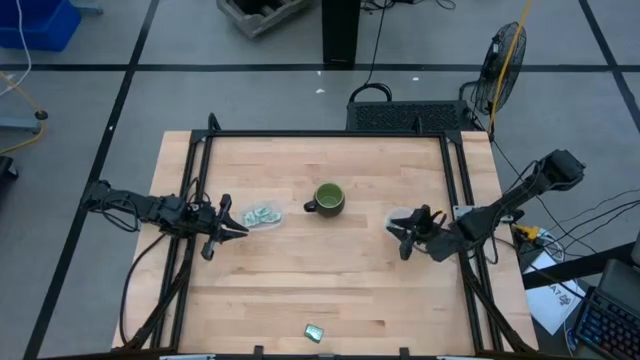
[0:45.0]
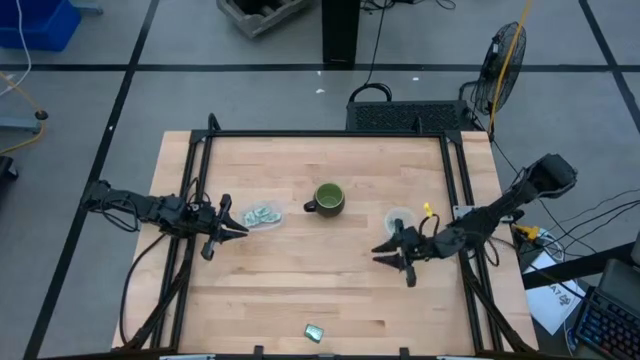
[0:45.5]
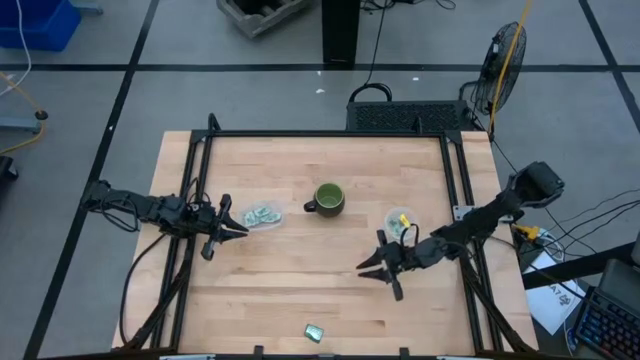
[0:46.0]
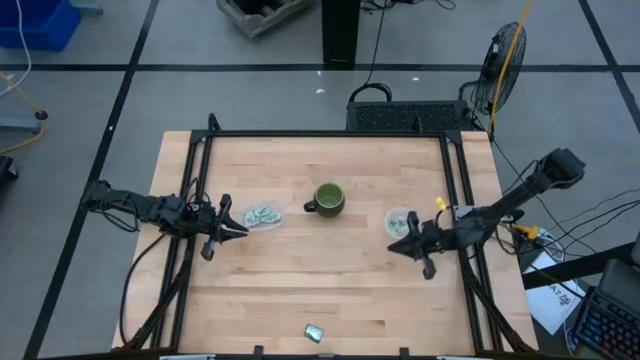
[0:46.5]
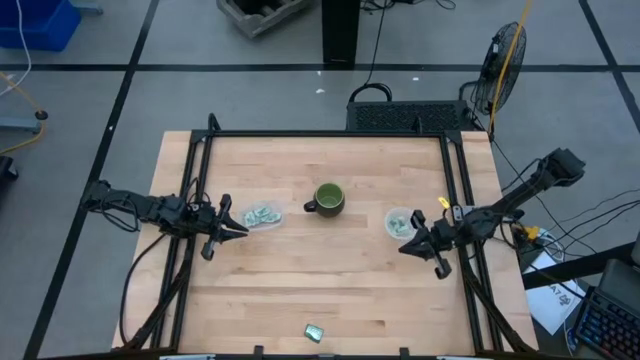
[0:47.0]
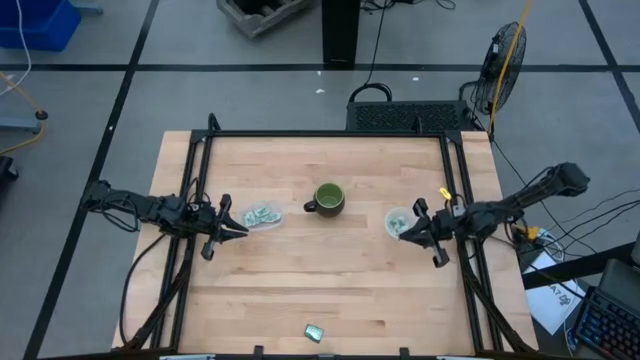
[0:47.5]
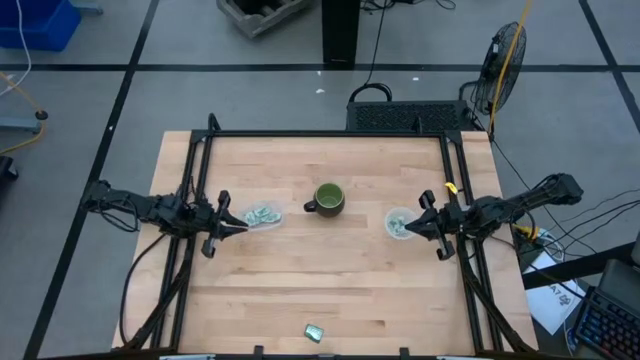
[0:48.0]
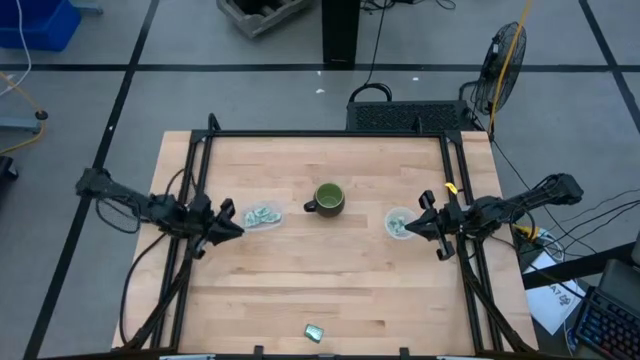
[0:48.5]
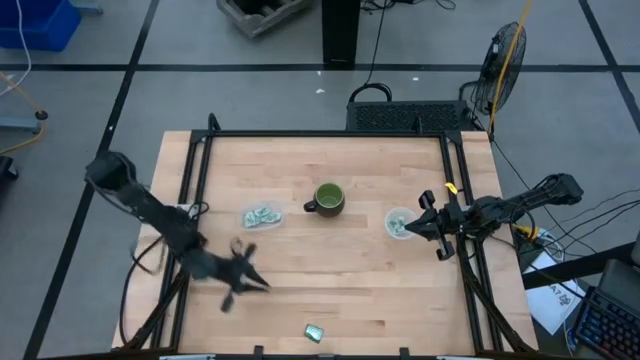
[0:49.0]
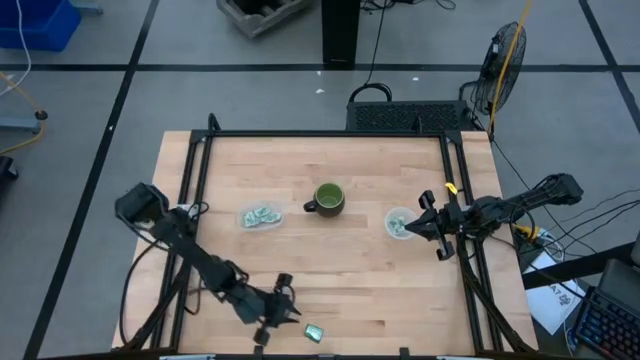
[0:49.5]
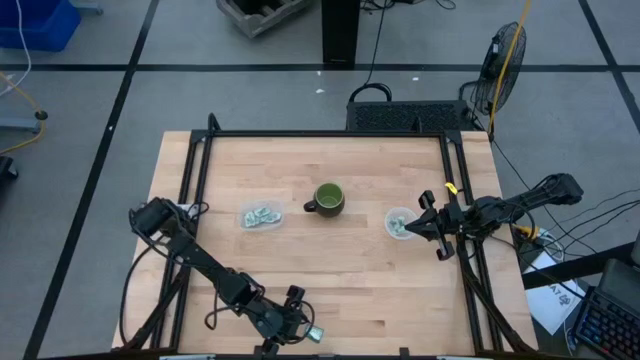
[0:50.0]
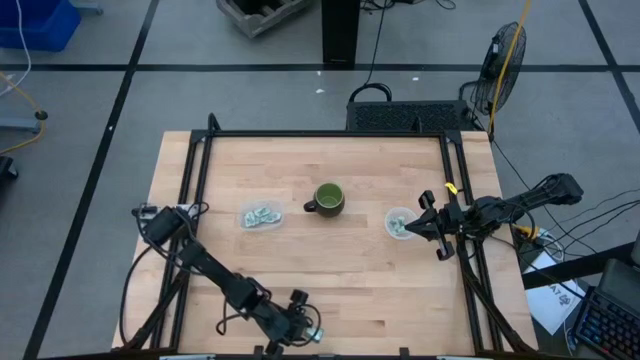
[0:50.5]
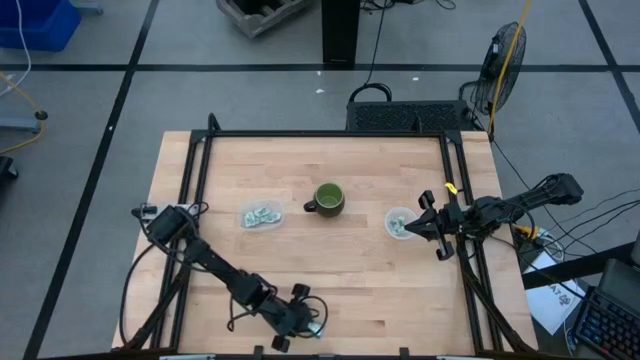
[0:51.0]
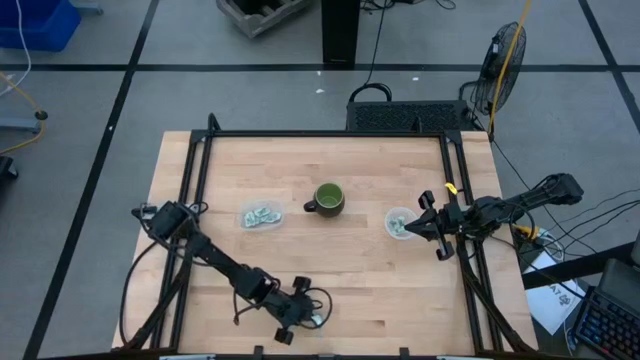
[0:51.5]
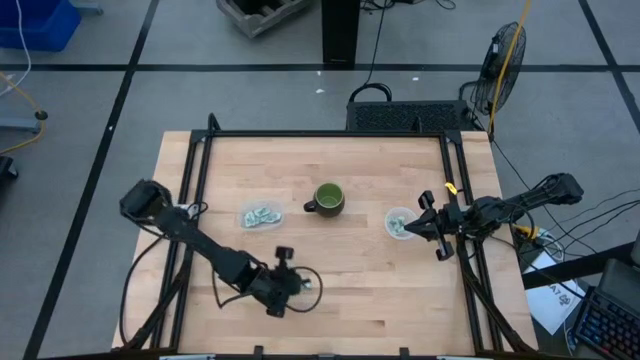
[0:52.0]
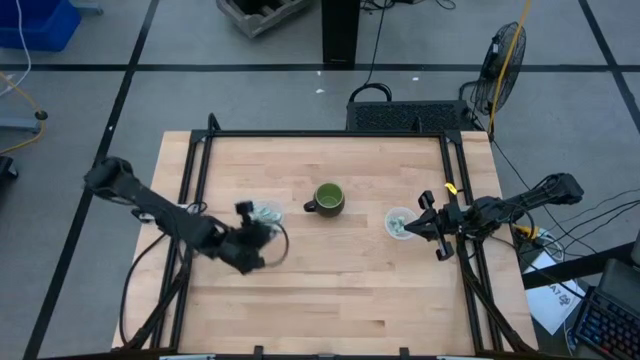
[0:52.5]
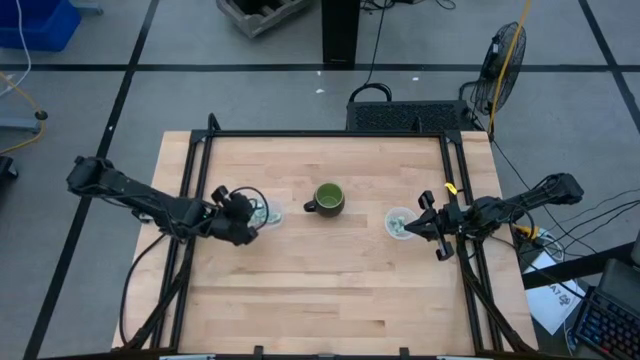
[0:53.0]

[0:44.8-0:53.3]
Task: Pick and place Stevia / Truvia into bins
Put the truvia packet into the oval transparent container

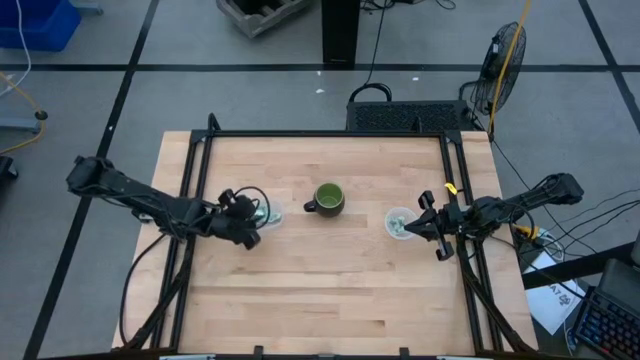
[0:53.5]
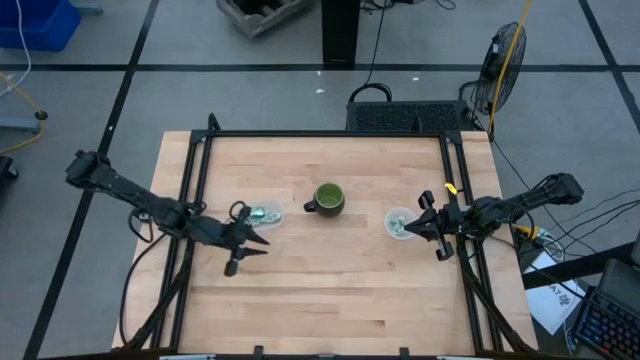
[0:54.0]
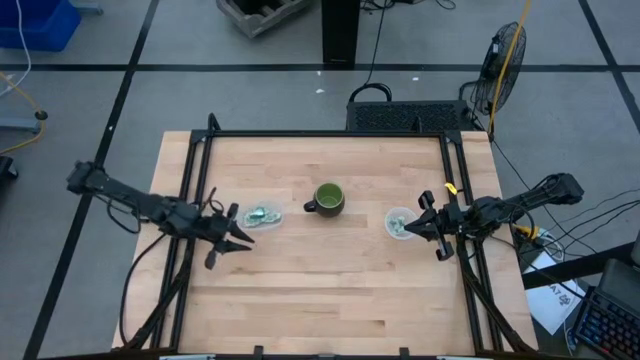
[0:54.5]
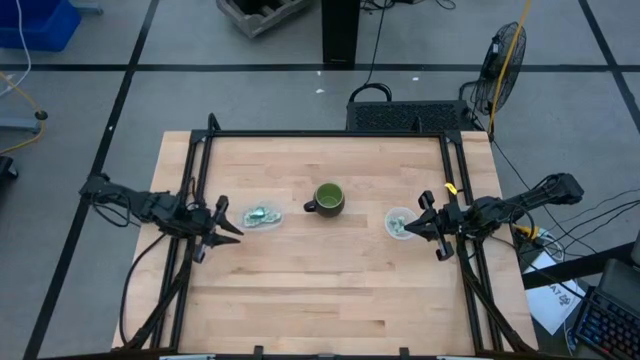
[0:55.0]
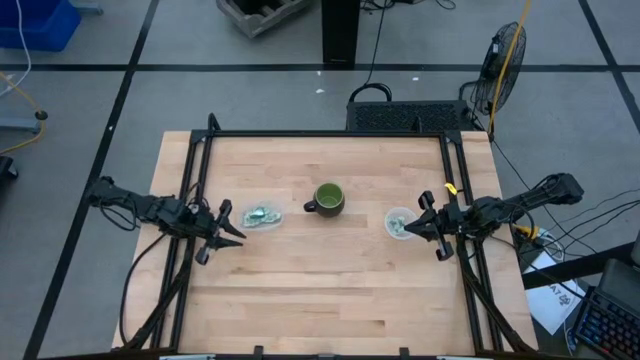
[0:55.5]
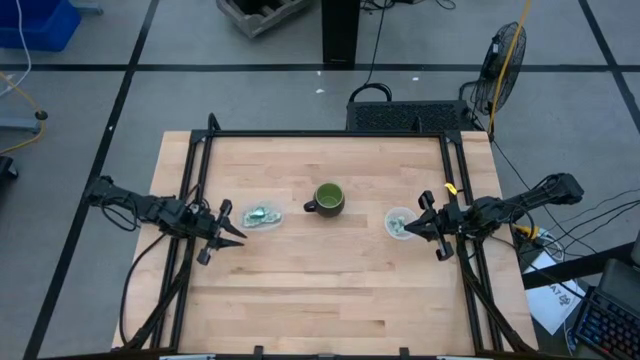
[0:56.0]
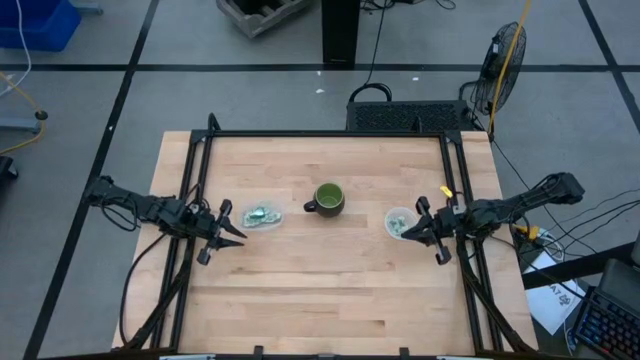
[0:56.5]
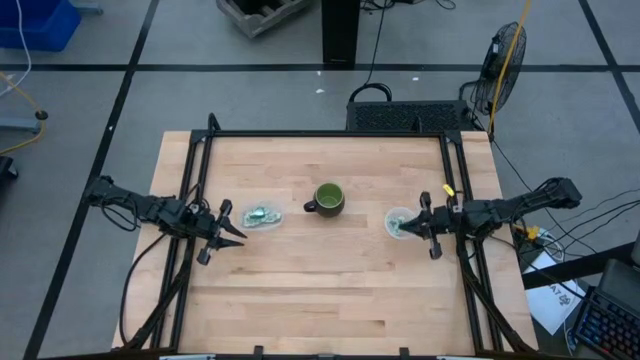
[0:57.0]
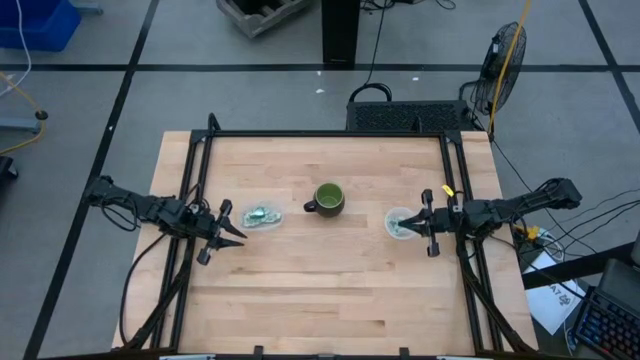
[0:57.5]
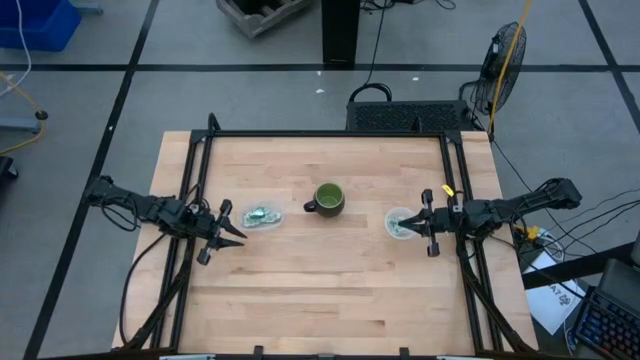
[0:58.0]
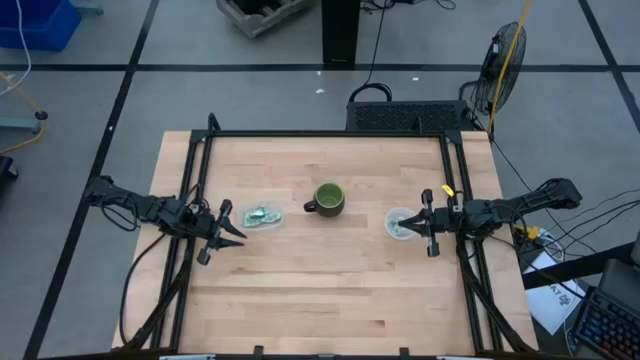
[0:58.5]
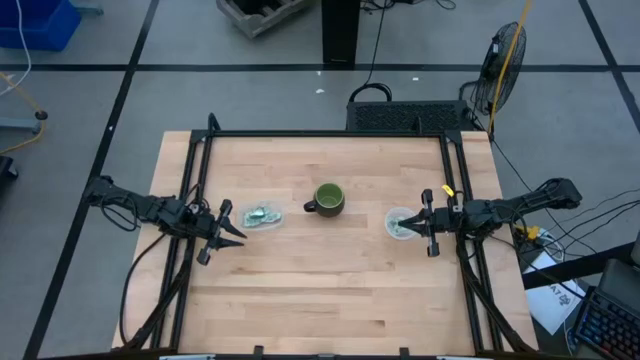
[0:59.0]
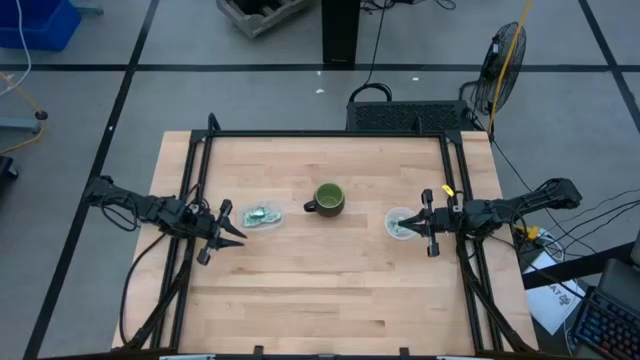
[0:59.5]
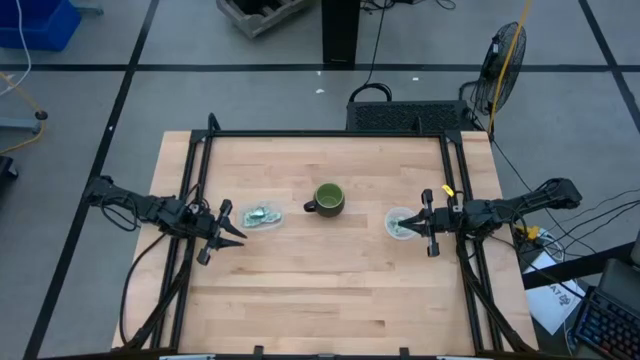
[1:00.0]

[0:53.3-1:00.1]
Return to Home Position

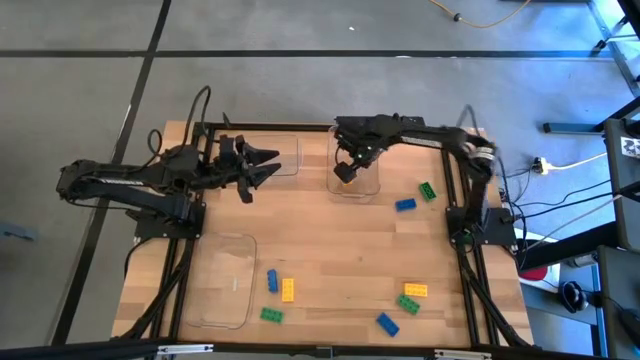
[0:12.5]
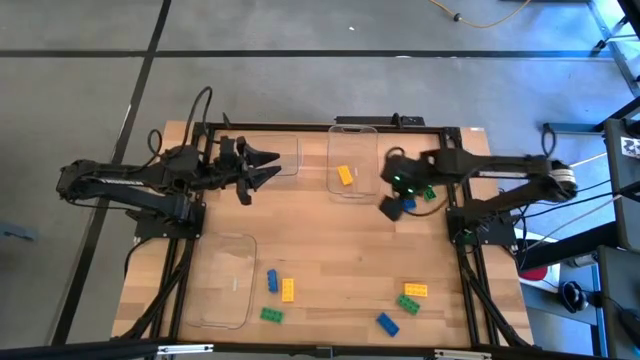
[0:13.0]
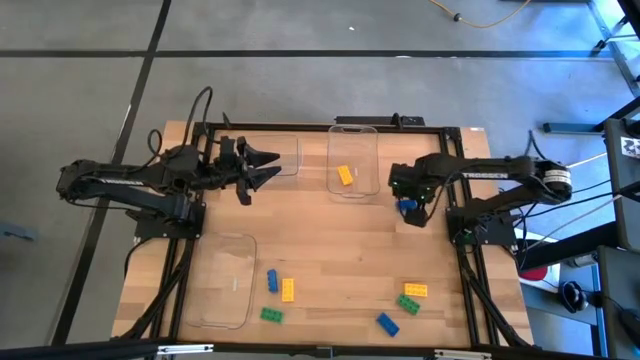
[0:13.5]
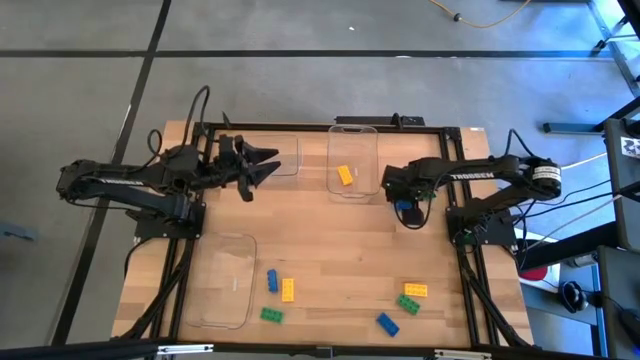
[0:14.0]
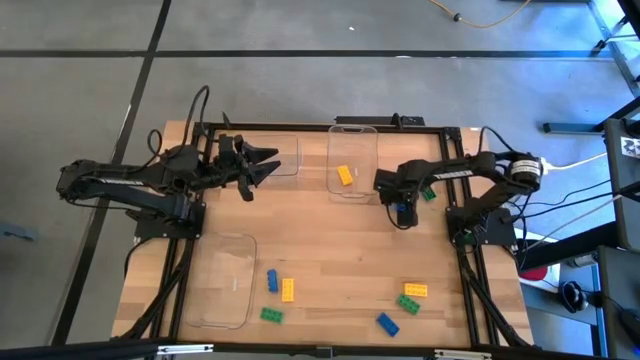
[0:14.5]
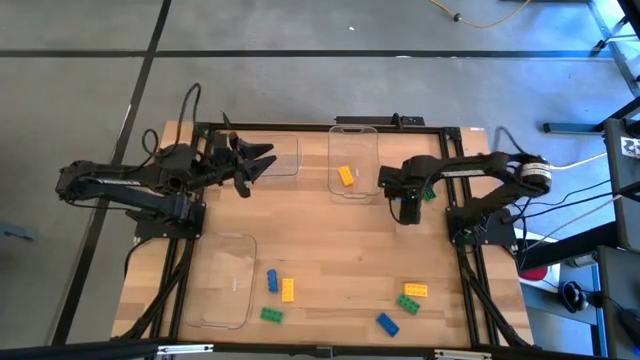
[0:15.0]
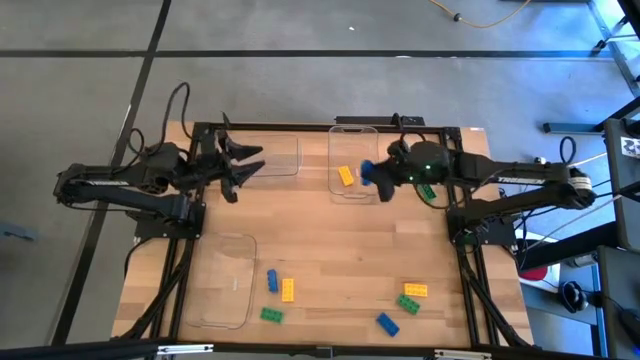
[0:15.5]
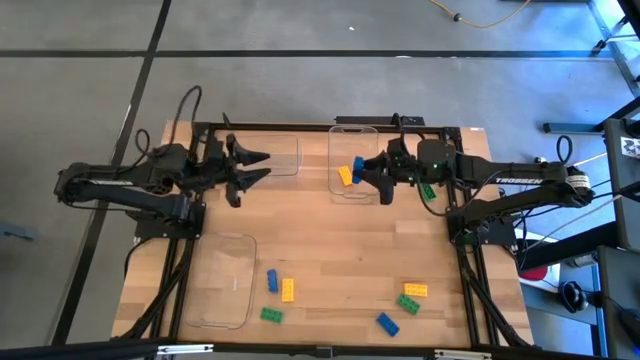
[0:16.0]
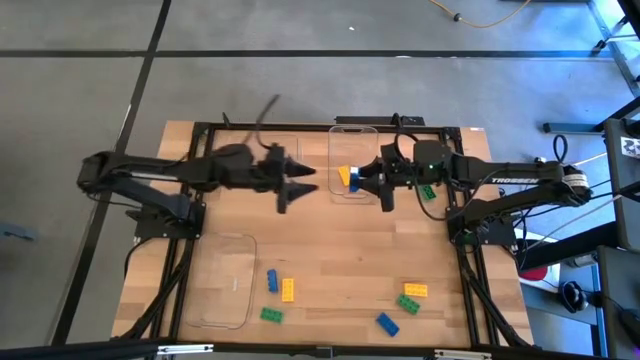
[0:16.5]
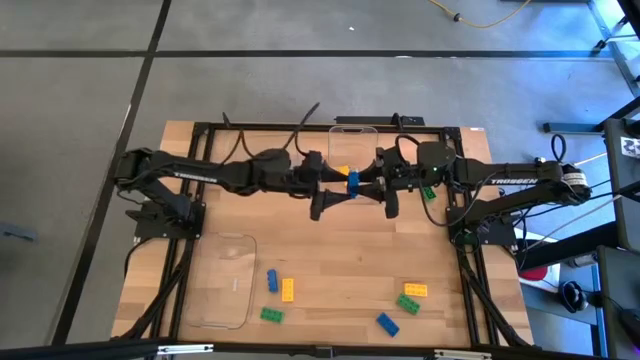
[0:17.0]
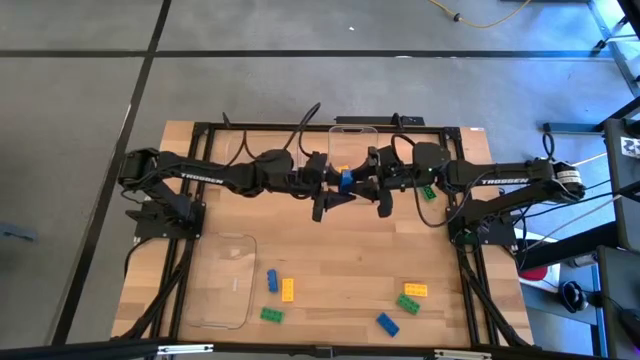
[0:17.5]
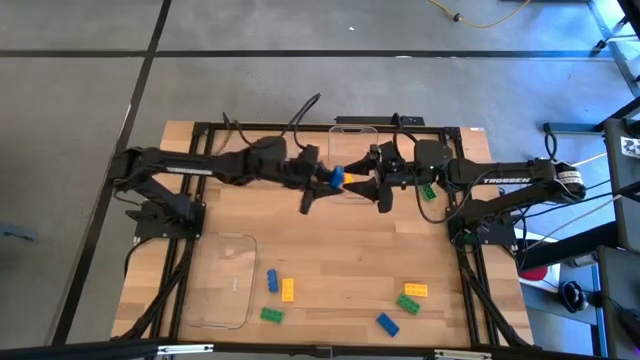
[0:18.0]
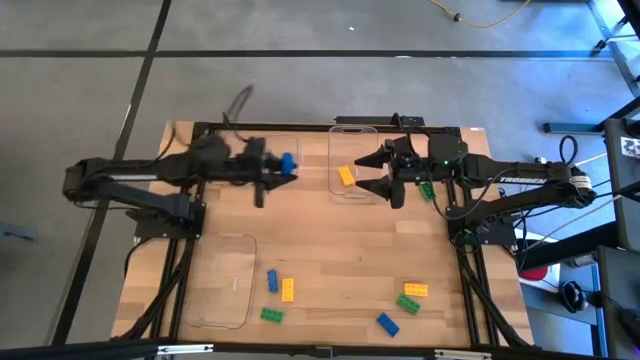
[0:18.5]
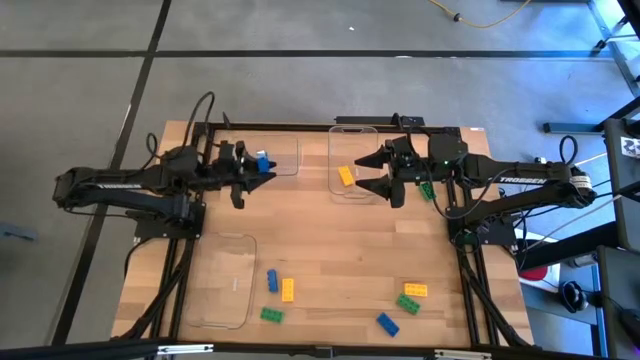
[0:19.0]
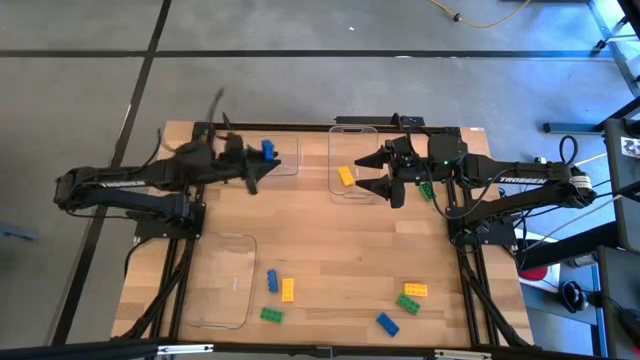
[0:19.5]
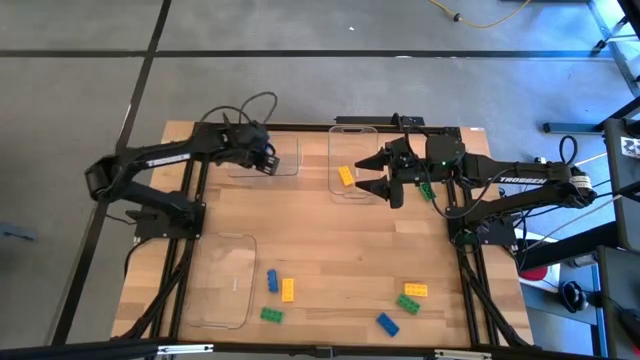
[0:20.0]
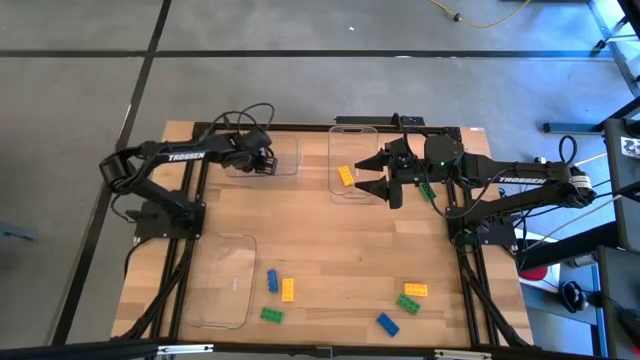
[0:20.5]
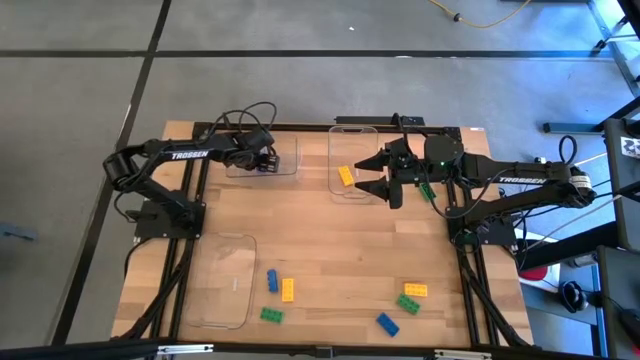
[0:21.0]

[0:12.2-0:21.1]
Task: Sort & place blocks by color
Put the top right blue game piece into the top left transparent bin
